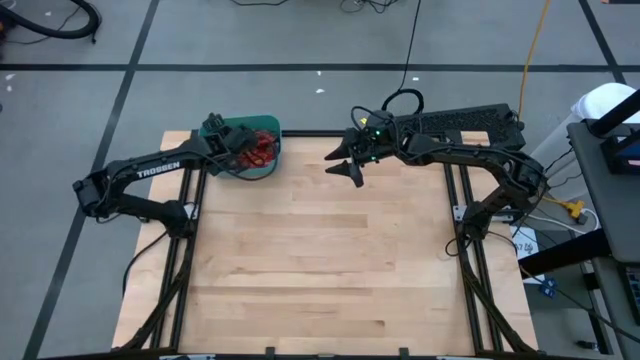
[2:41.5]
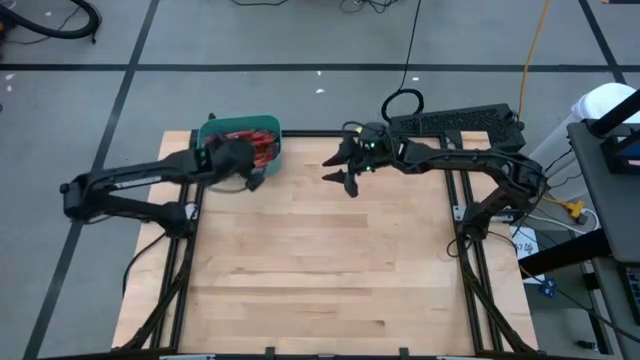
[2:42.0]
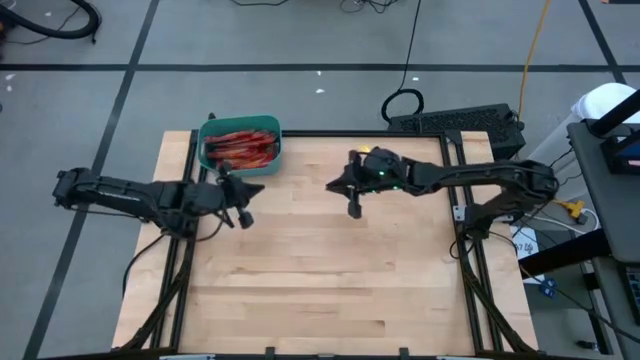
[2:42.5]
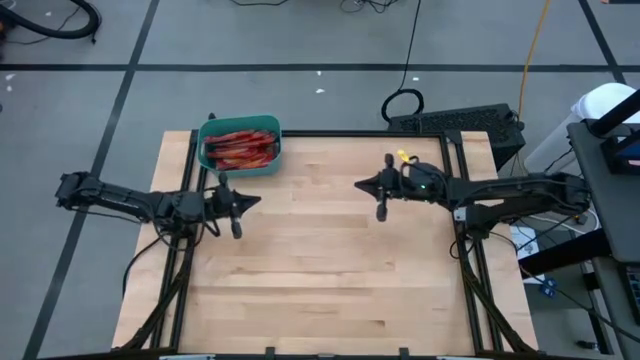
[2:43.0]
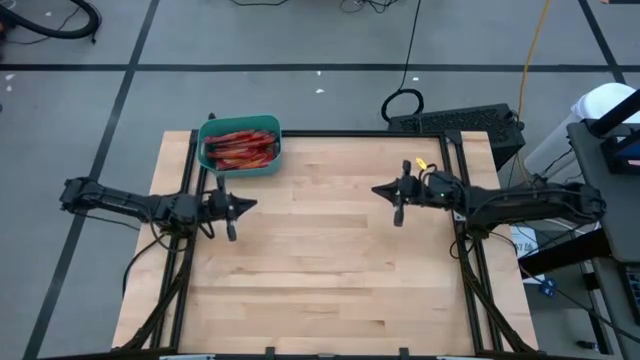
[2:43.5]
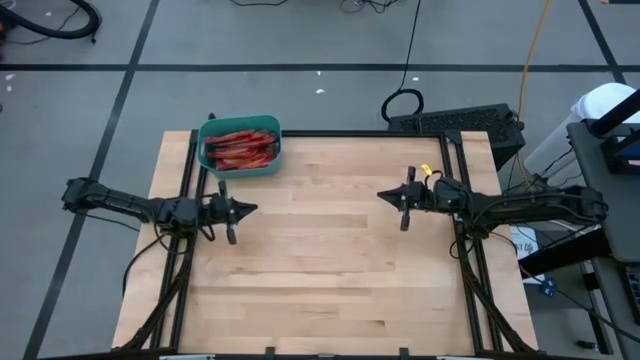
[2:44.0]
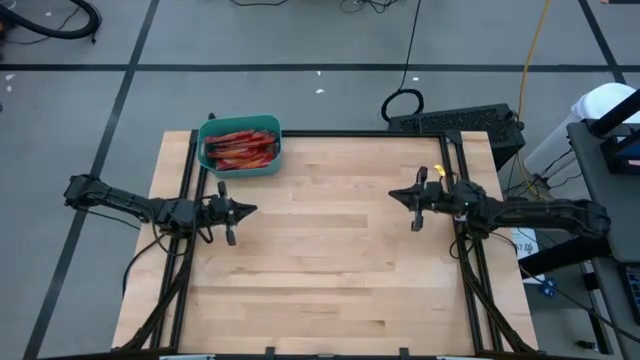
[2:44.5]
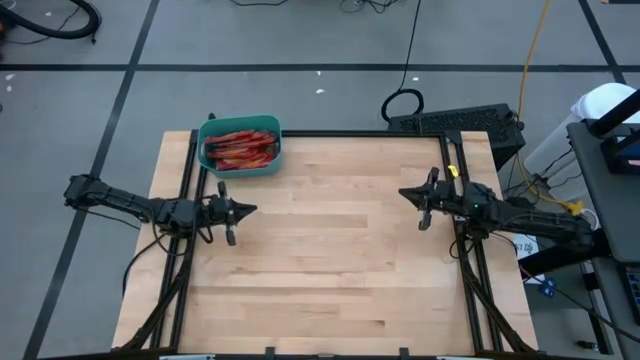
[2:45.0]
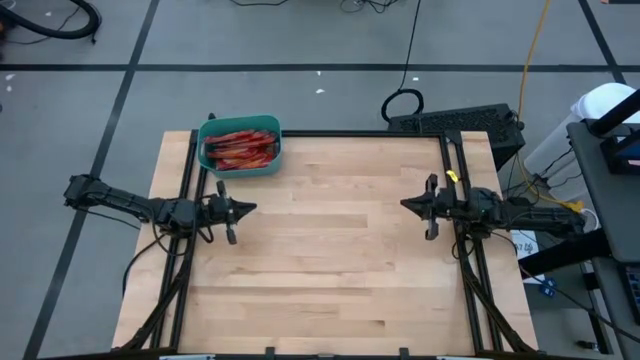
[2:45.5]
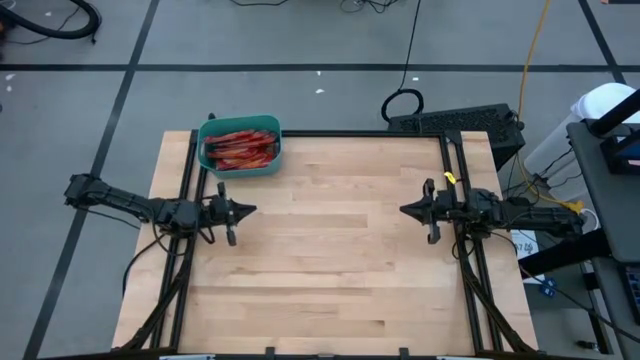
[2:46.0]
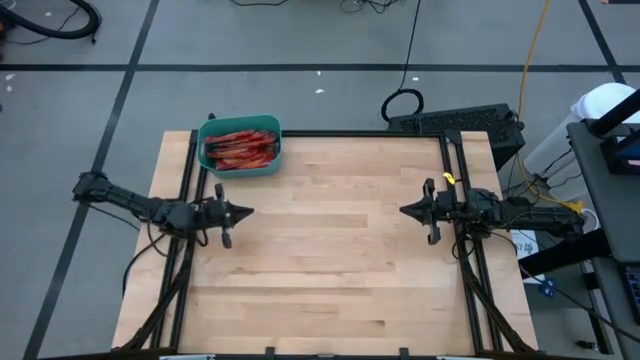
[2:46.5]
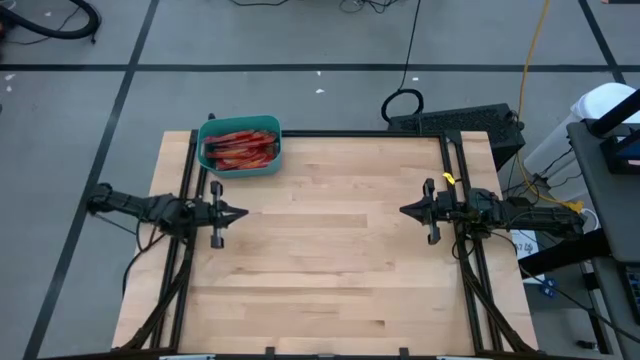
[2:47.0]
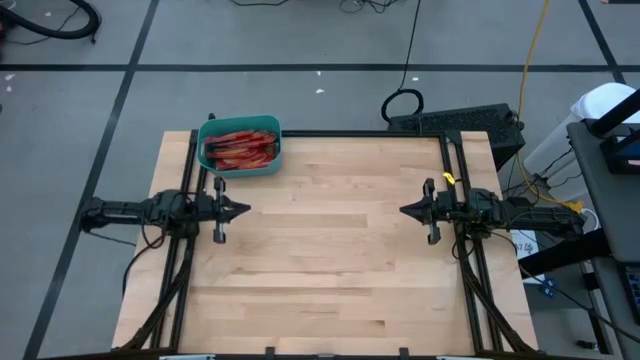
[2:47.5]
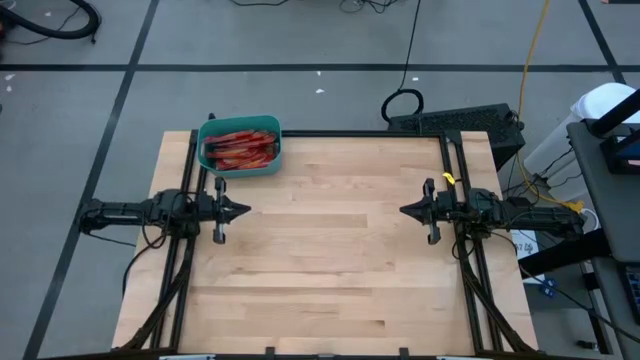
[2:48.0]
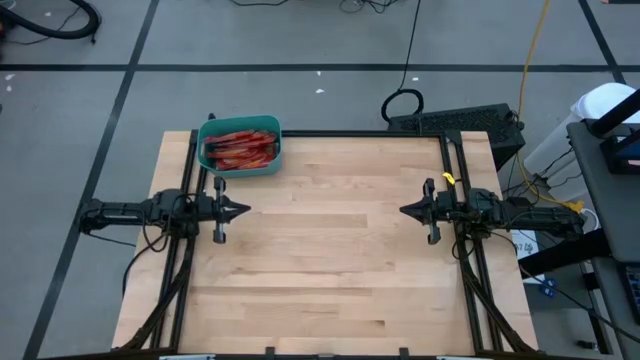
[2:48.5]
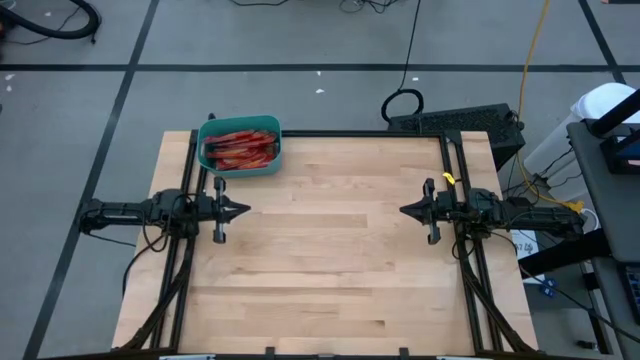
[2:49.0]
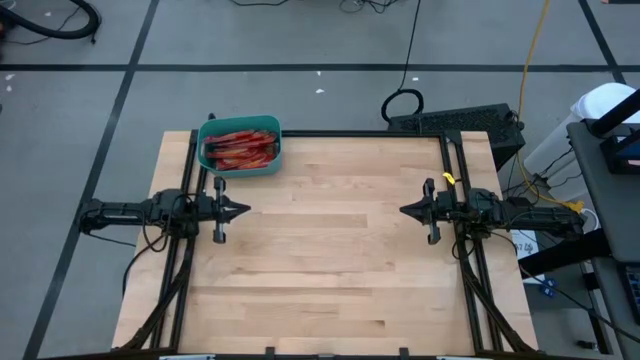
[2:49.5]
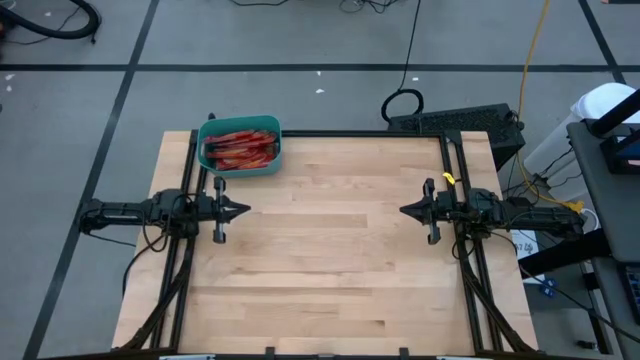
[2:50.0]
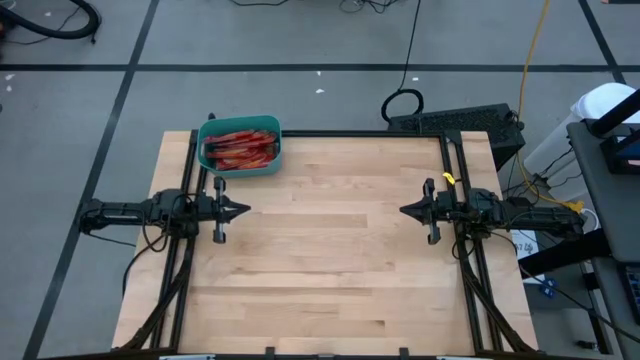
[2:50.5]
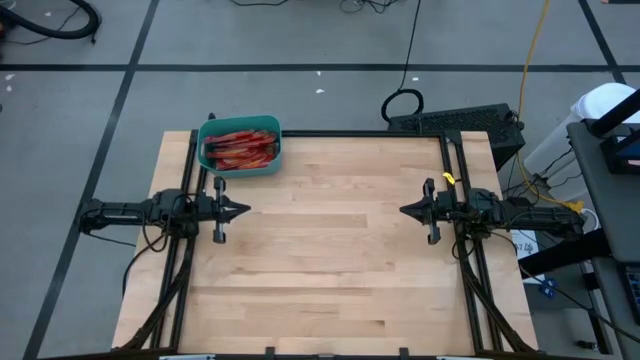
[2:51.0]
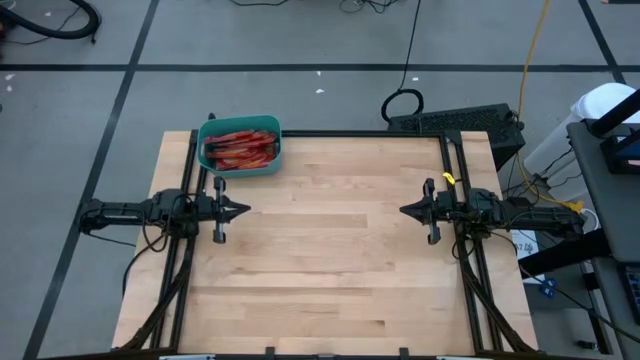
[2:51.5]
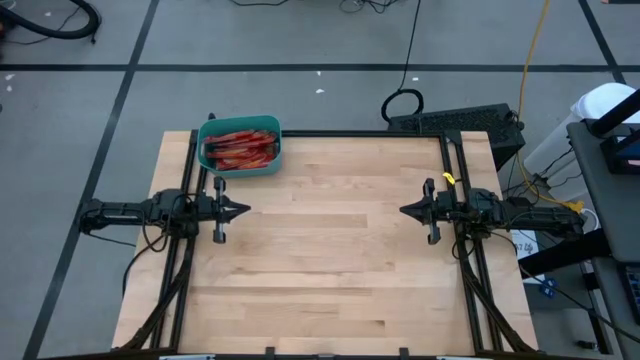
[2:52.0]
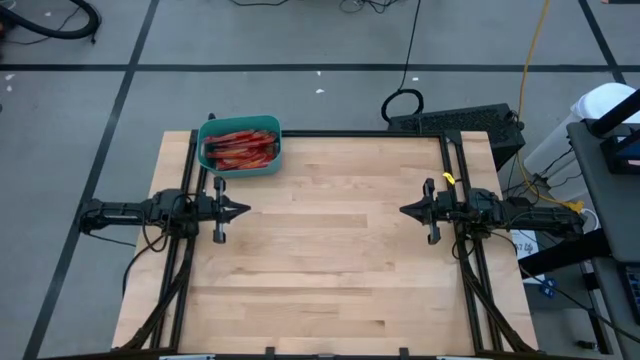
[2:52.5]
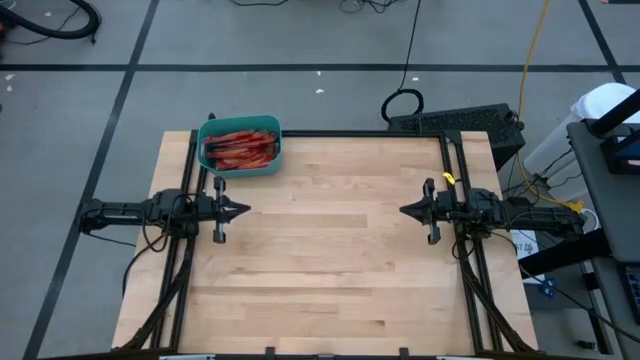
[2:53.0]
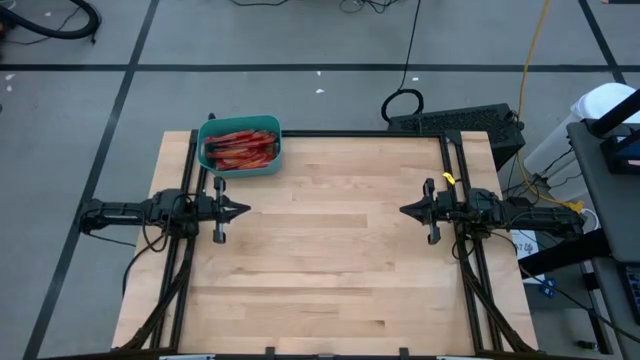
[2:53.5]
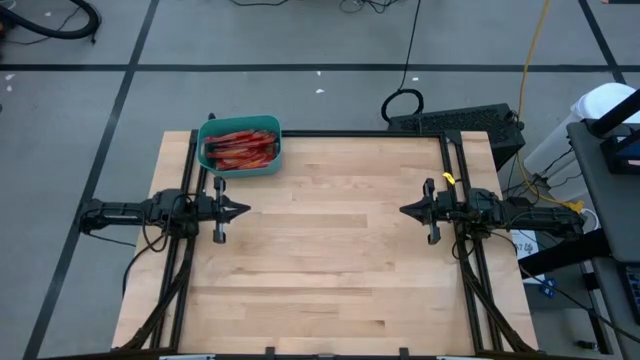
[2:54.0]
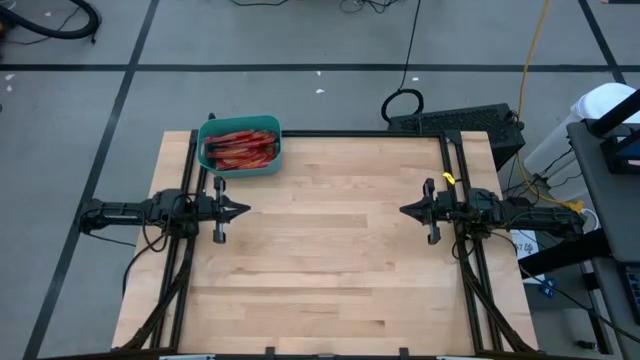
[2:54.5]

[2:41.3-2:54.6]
Task: Sort popcorn bags into baskets
Return to Home Position

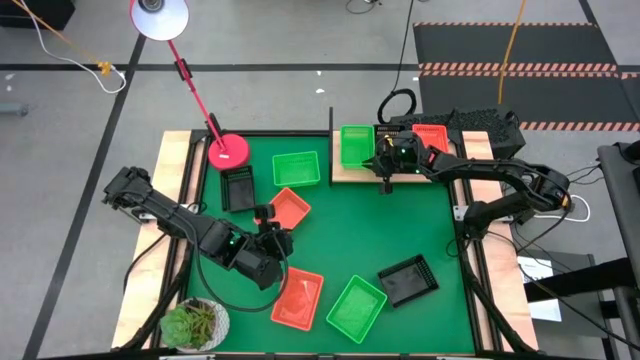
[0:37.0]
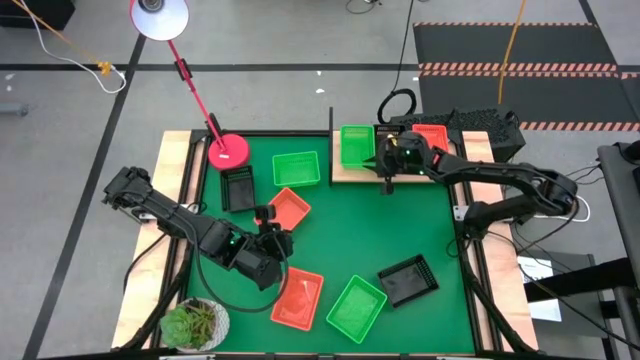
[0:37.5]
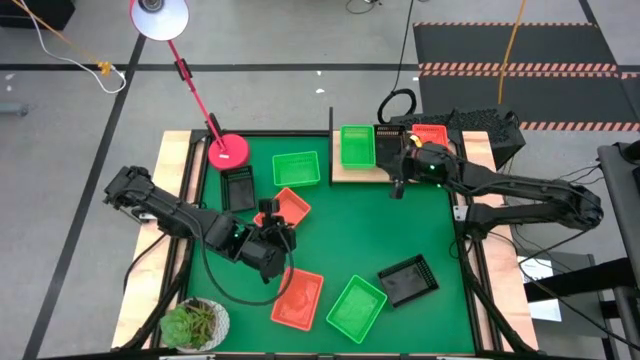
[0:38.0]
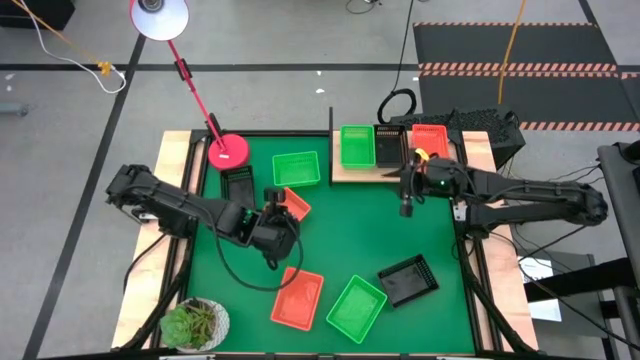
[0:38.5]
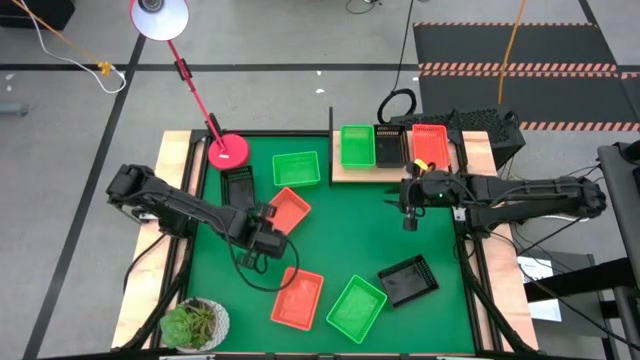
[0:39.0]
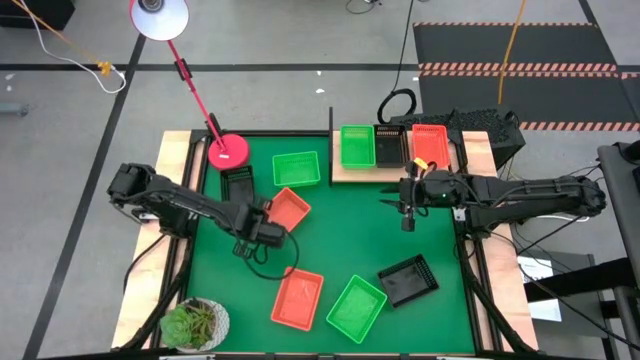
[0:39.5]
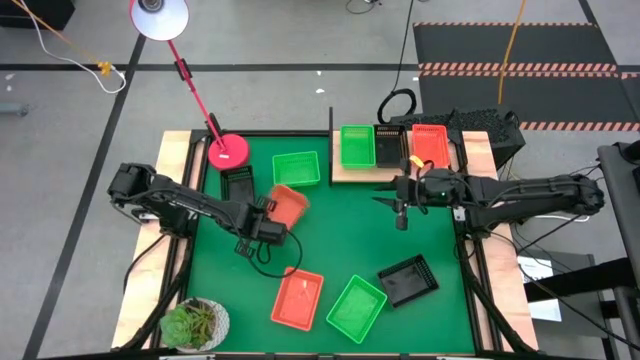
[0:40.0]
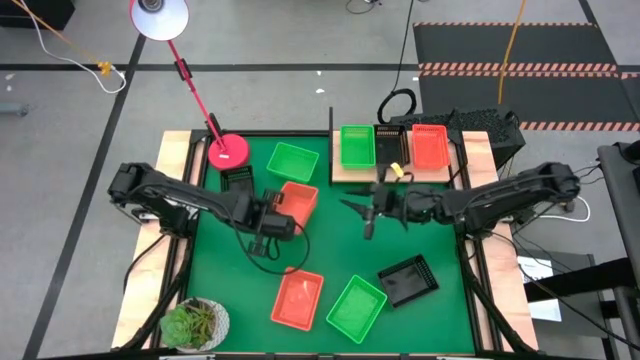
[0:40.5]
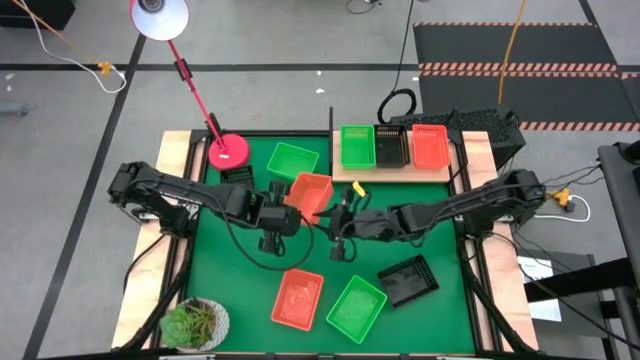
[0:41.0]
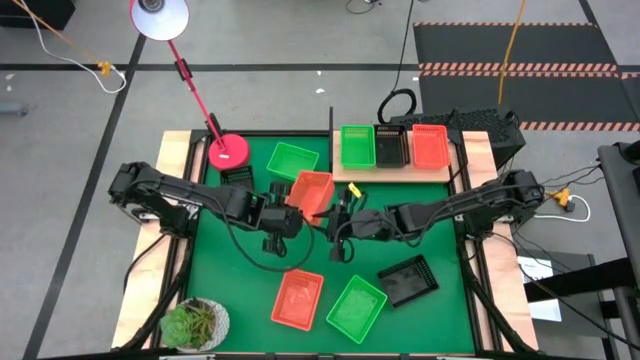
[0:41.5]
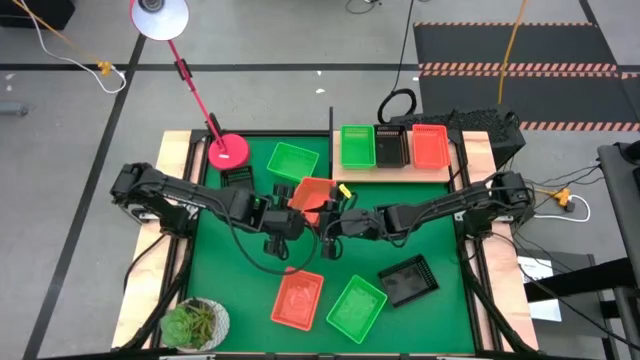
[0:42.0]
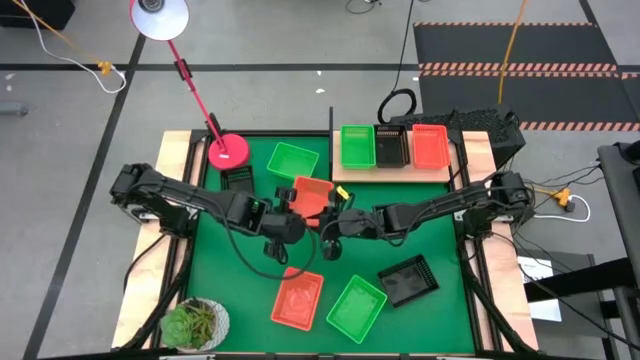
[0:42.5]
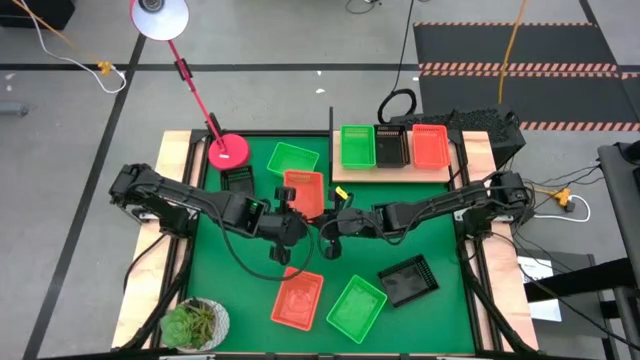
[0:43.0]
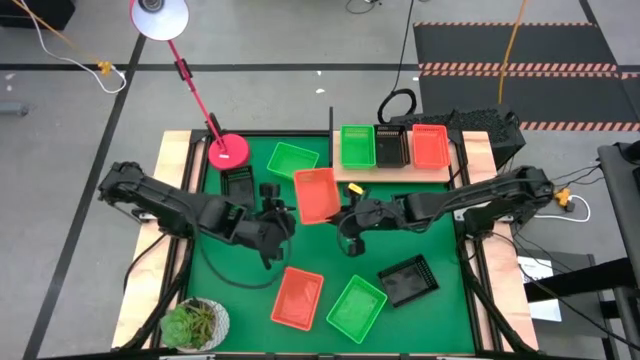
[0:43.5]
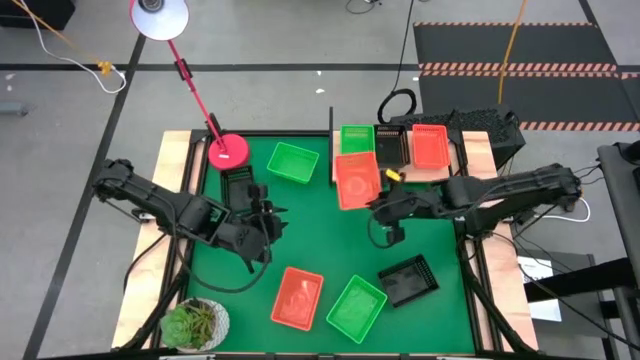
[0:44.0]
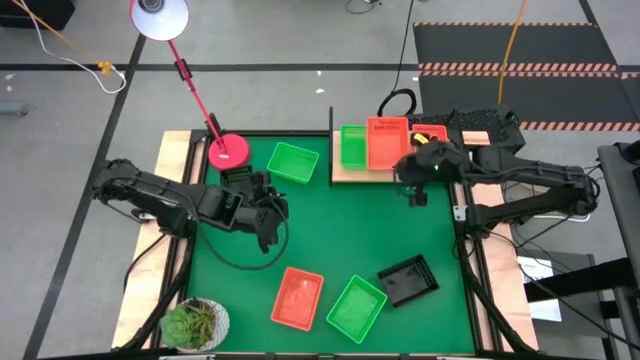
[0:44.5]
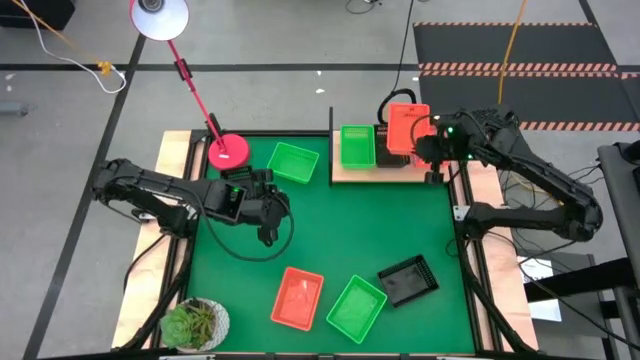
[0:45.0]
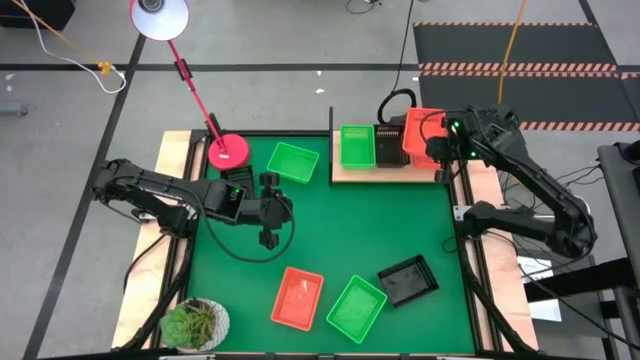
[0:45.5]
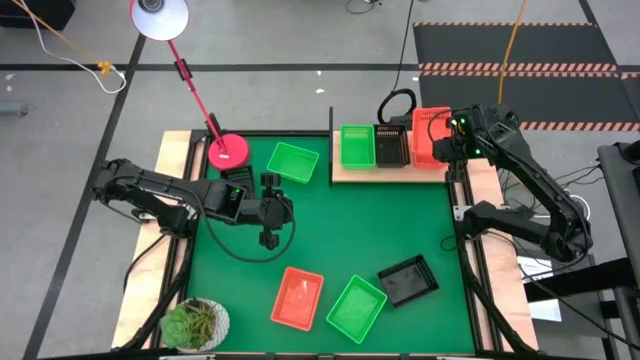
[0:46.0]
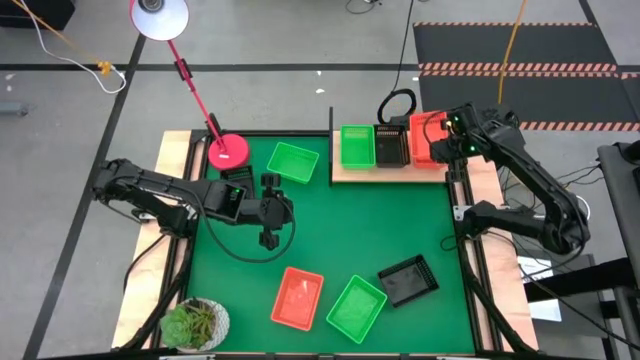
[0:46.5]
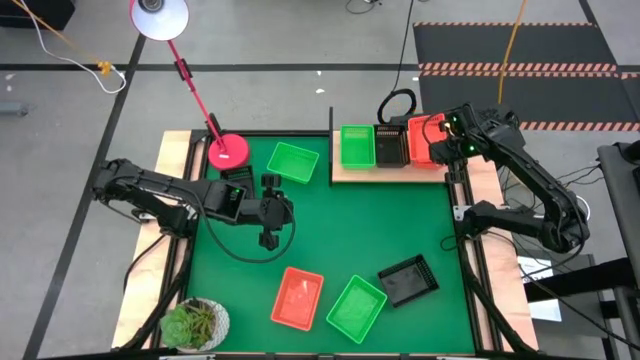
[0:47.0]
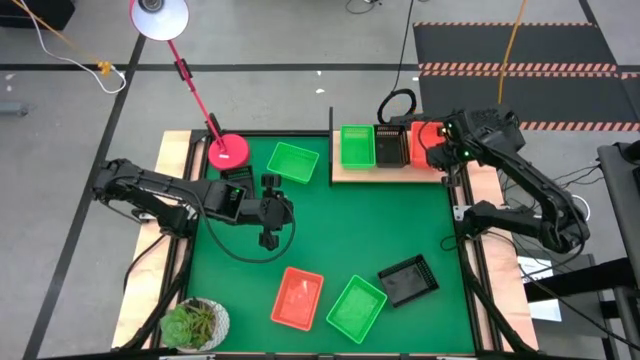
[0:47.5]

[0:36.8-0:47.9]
Task: Stack baskets on shelf by color
Stack the top orange bin on top of the other orange bin on the shelf
